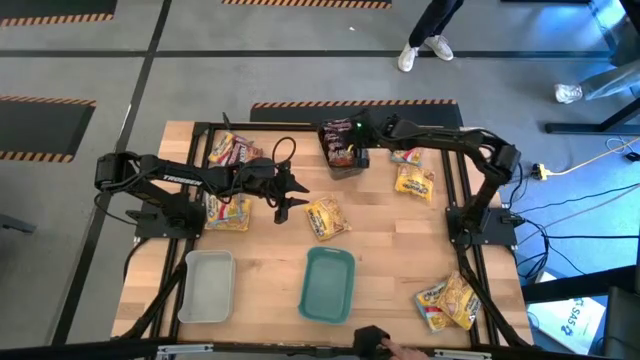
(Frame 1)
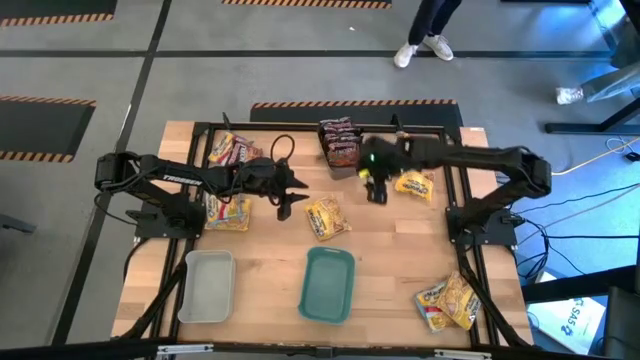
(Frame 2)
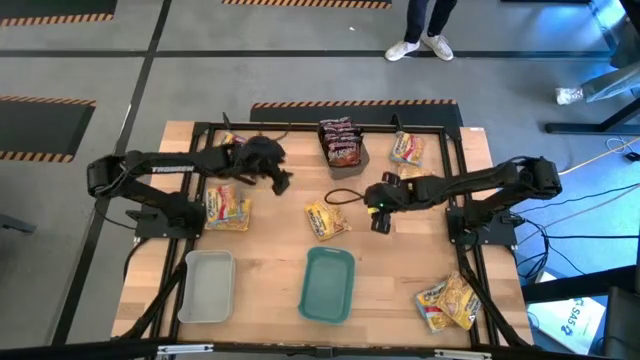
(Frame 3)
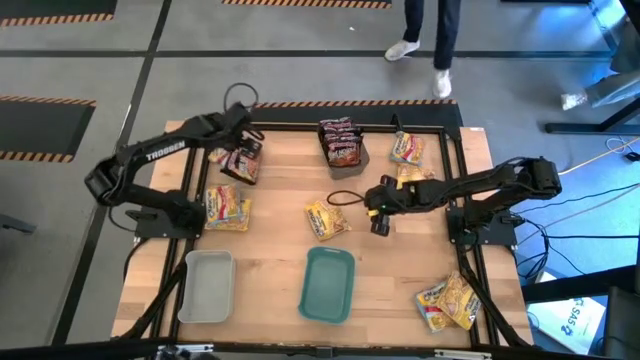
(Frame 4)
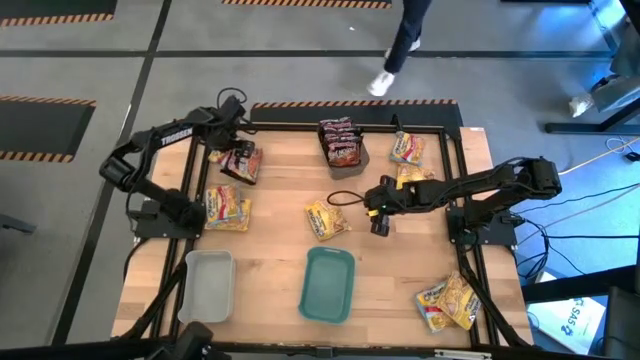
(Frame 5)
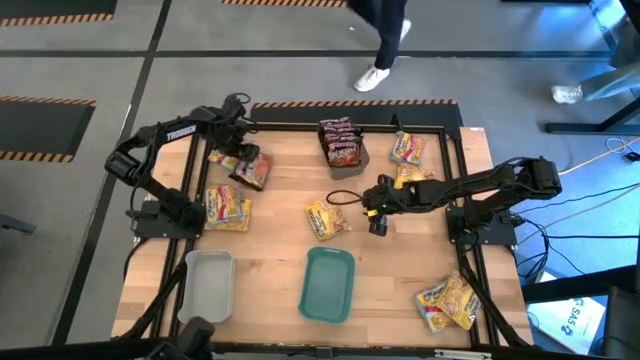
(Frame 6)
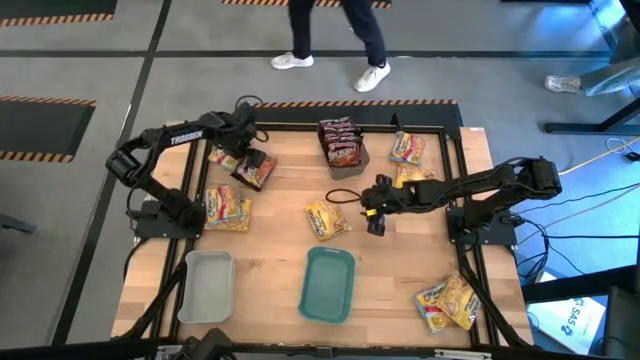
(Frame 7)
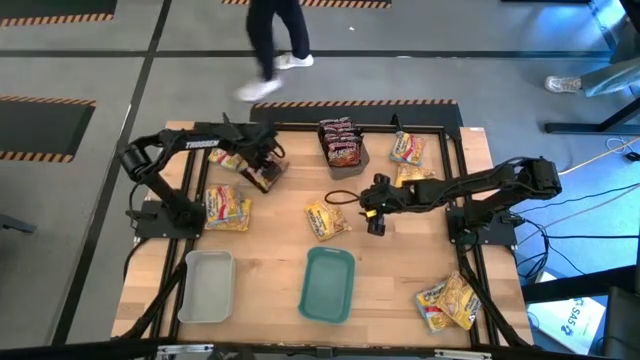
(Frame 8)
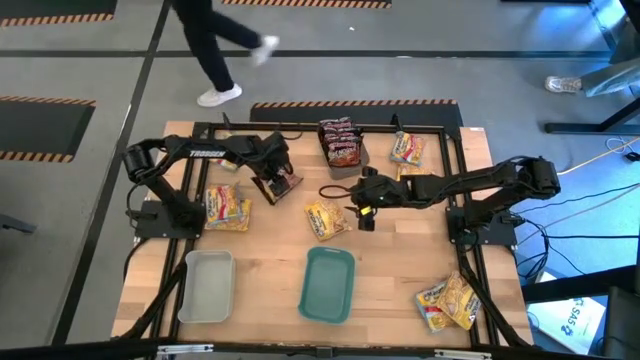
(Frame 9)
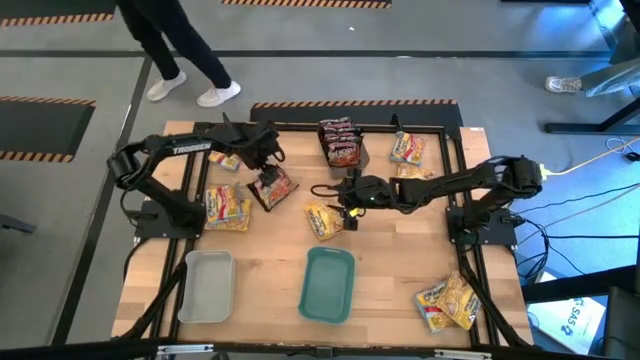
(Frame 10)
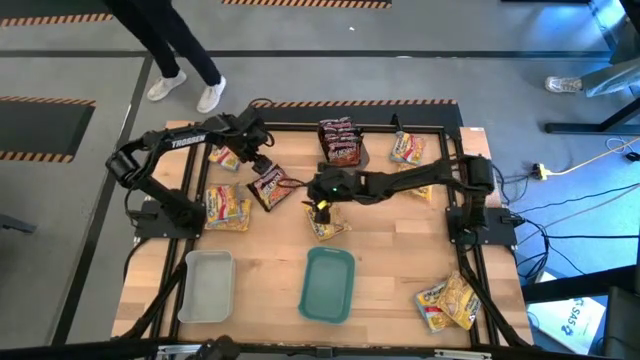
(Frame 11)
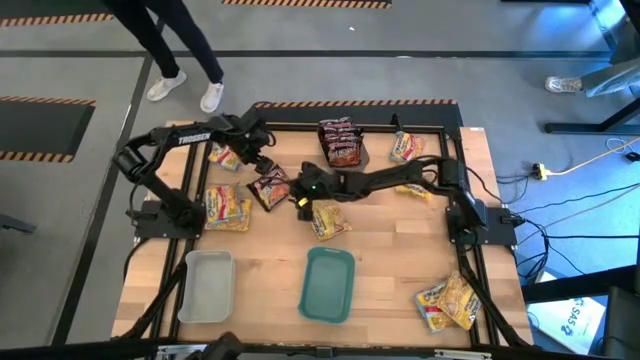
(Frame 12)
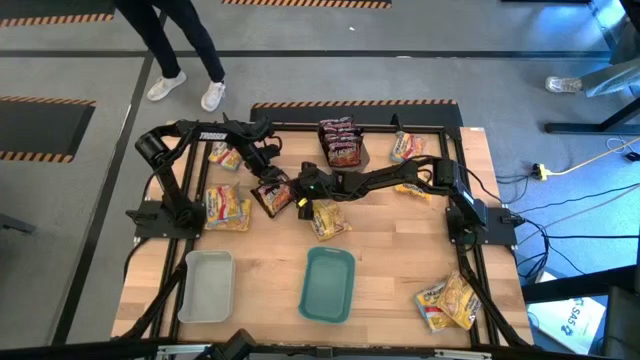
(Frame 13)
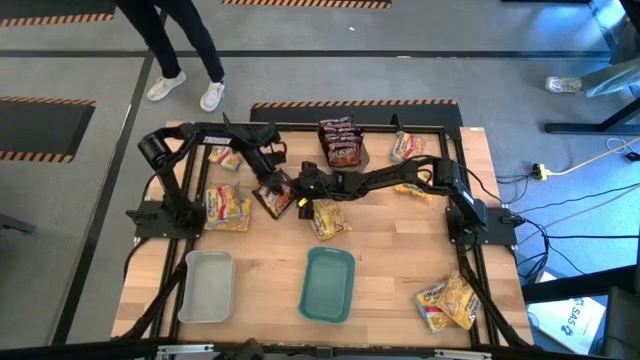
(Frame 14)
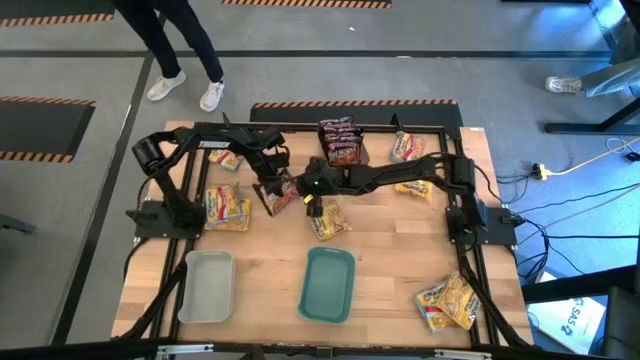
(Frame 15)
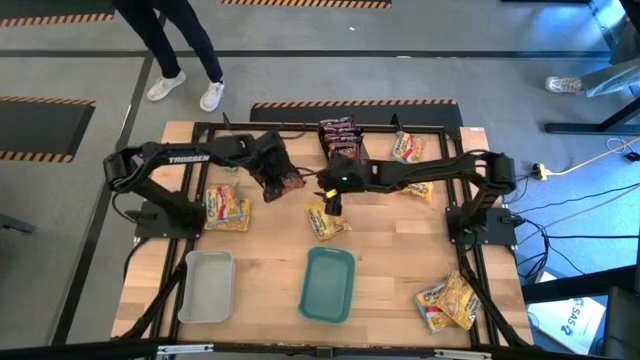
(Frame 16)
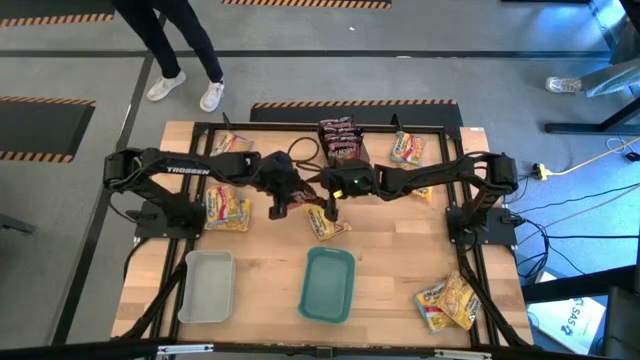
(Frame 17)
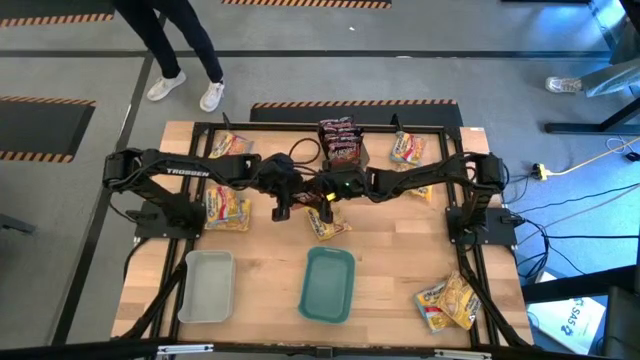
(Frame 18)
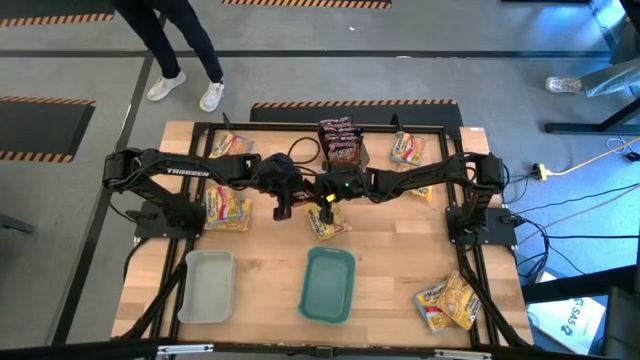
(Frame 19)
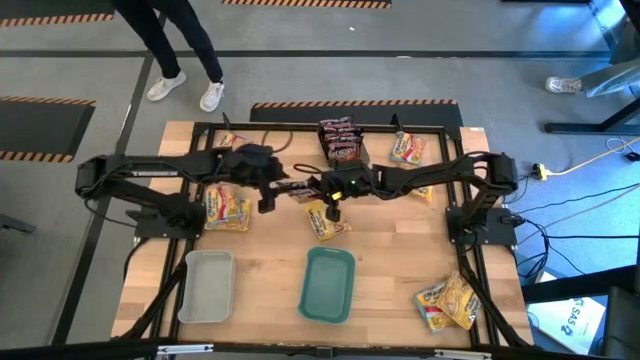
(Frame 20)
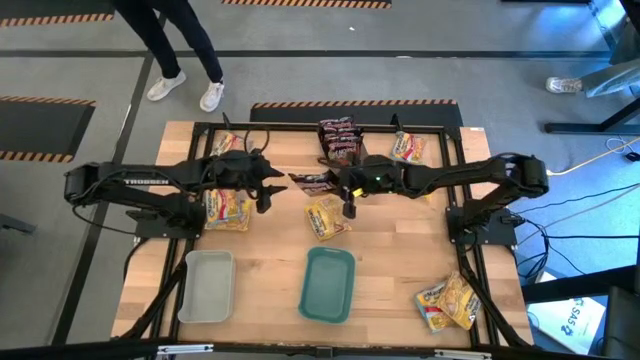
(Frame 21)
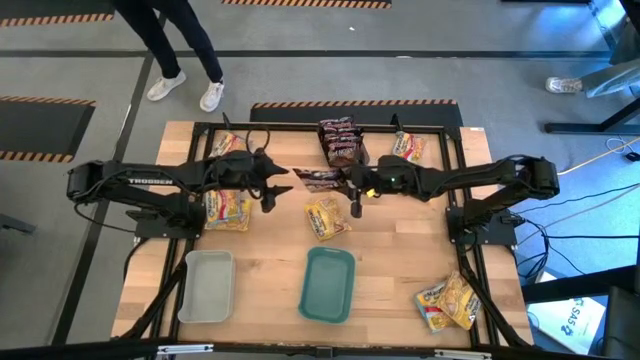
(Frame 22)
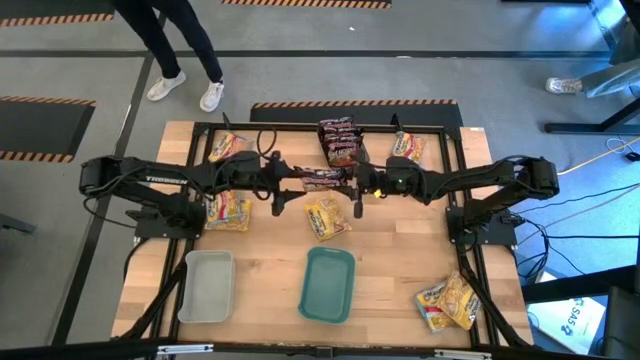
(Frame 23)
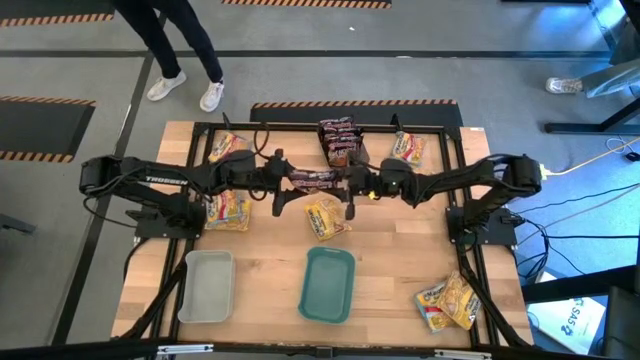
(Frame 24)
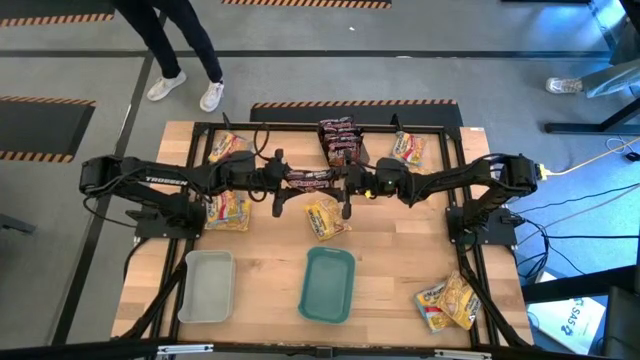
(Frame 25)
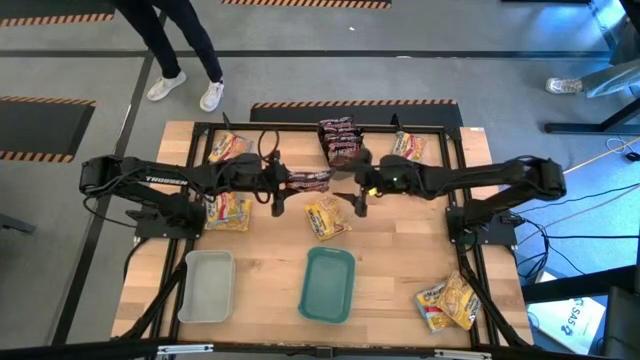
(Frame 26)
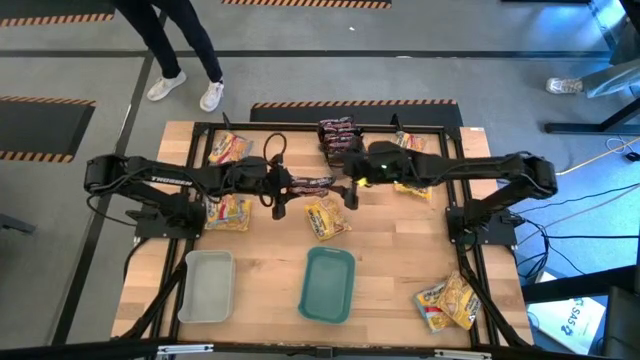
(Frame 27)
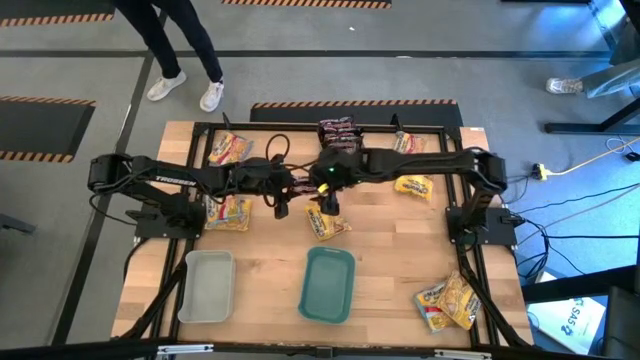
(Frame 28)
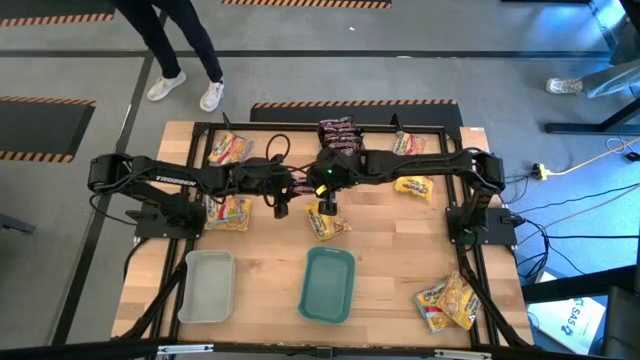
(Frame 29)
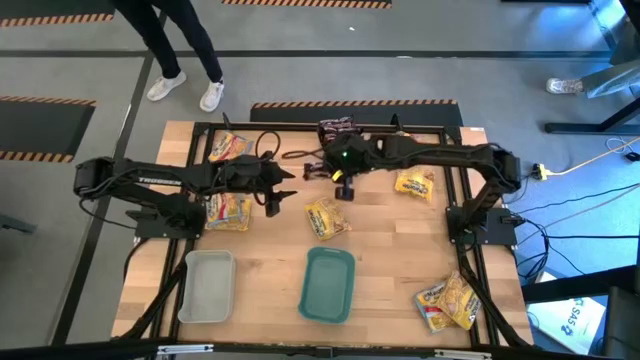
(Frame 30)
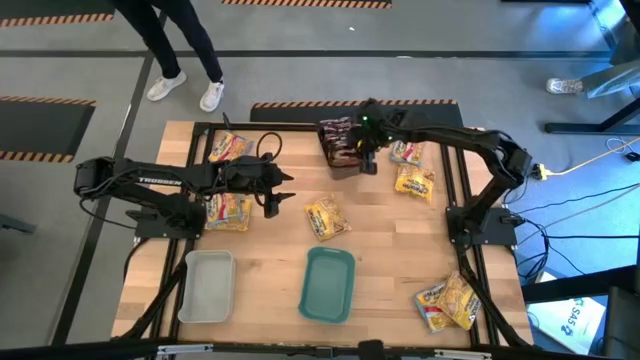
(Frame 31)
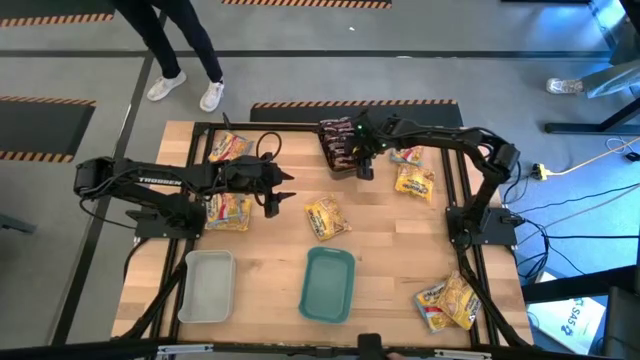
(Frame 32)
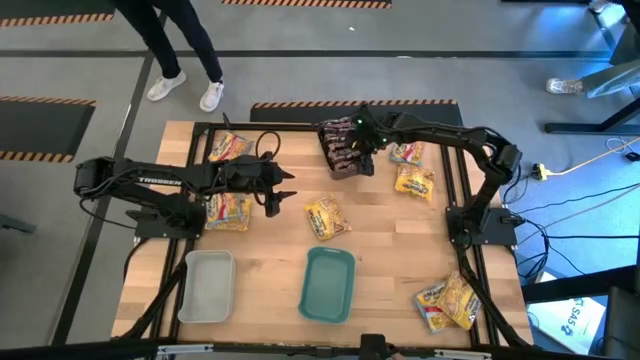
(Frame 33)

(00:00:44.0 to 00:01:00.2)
Task: Sort Maruchan noodles
Put the black noodle pack into the black bin

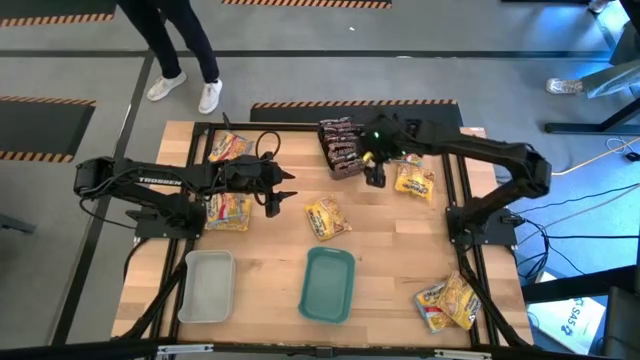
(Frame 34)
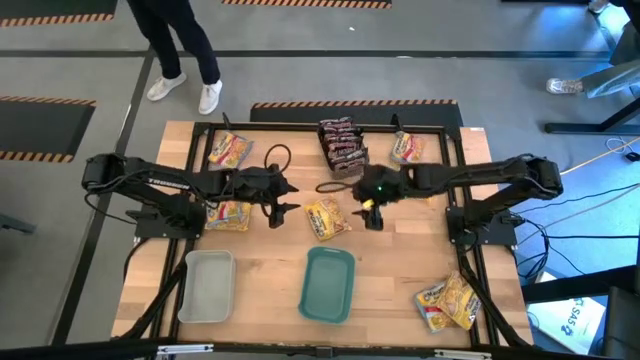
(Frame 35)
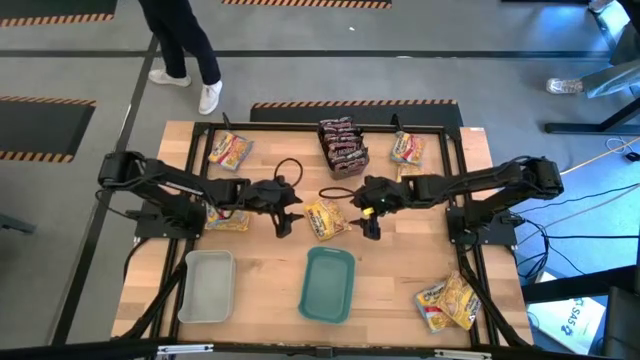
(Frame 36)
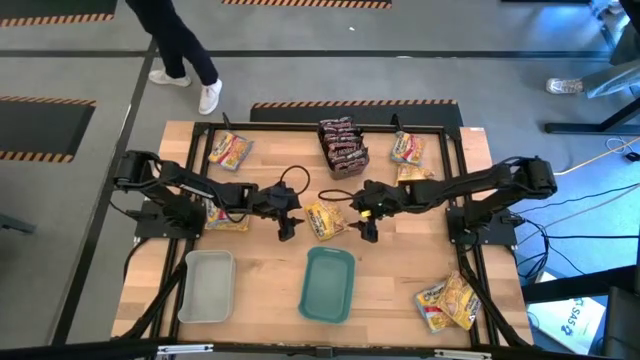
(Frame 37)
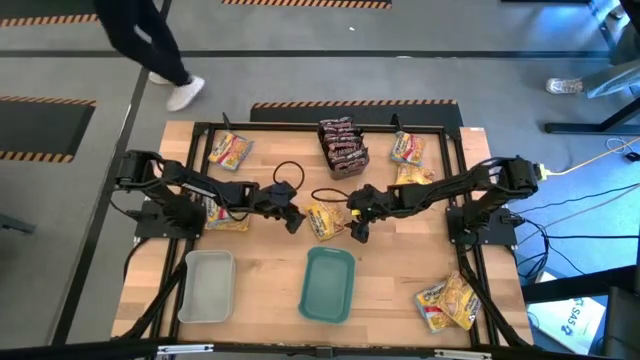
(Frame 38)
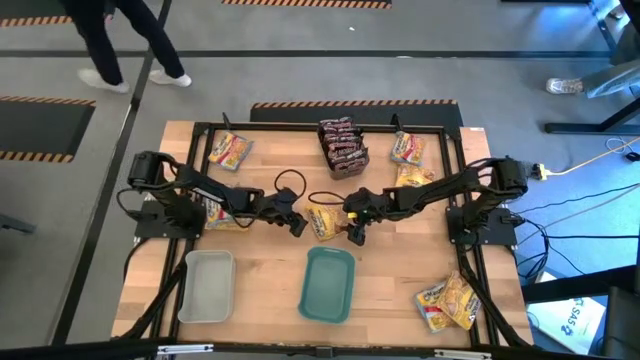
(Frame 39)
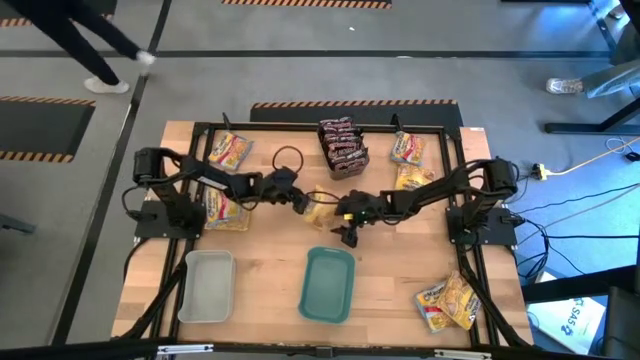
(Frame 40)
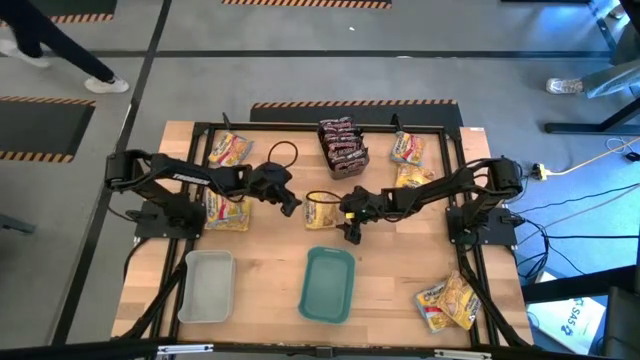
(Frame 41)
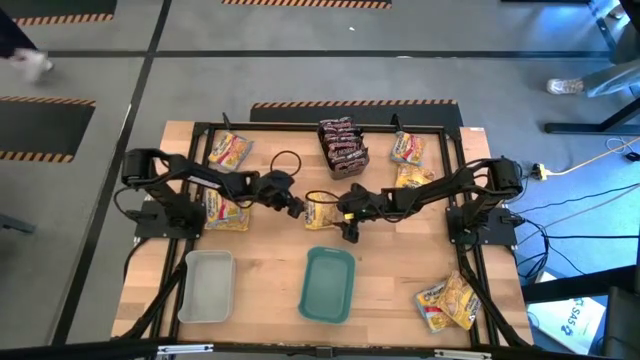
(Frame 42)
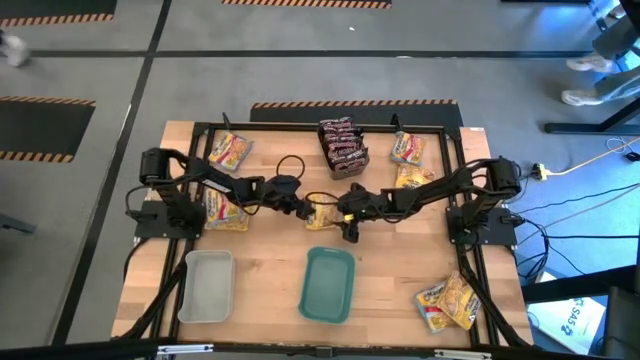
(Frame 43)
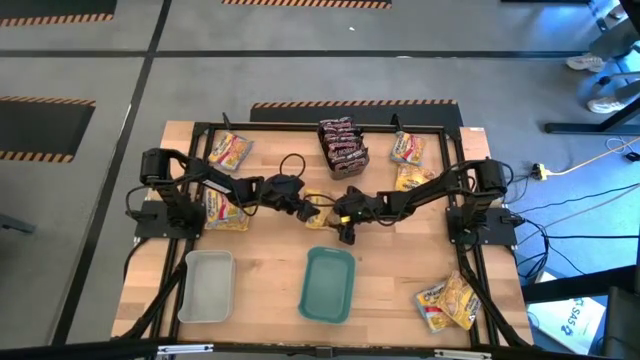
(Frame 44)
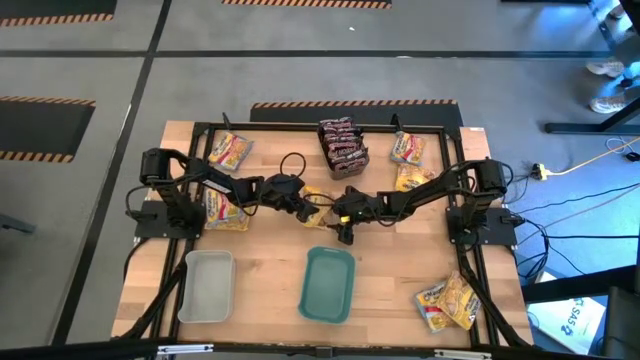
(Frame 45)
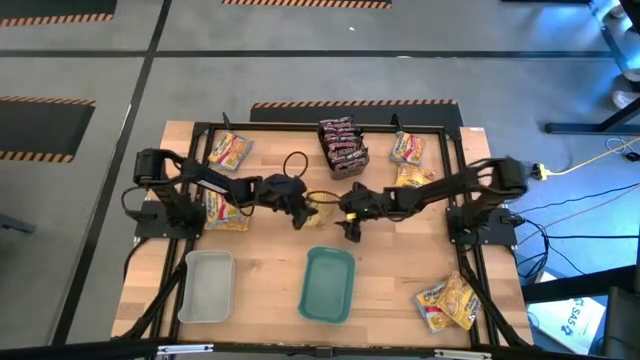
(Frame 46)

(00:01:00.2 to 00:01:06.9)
Put the yellow noodle pack into the green bin
